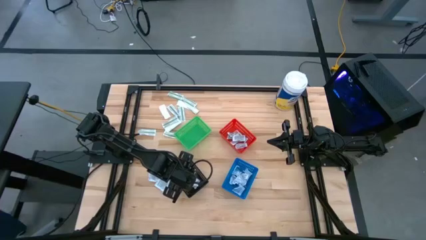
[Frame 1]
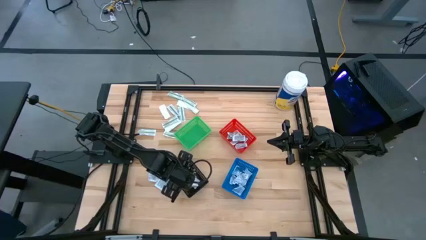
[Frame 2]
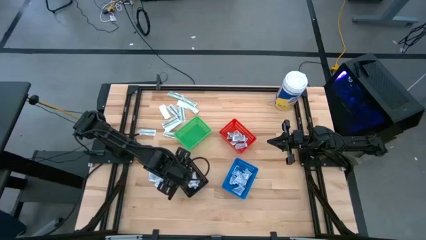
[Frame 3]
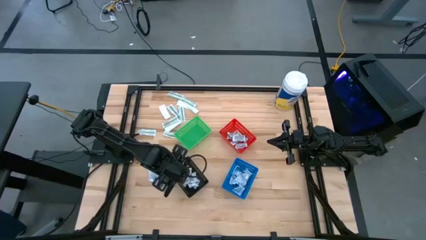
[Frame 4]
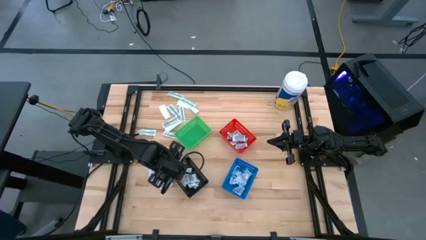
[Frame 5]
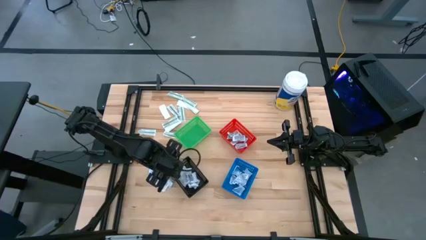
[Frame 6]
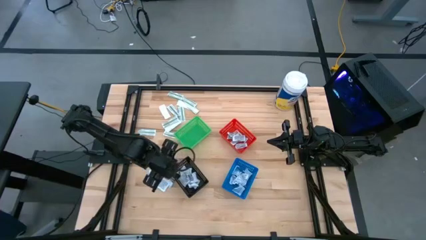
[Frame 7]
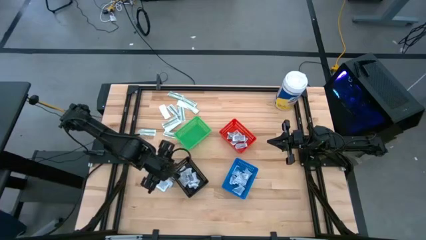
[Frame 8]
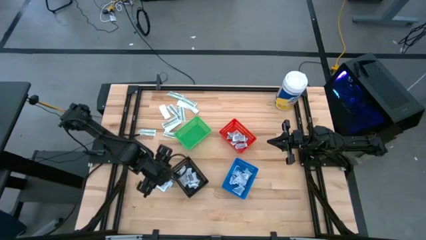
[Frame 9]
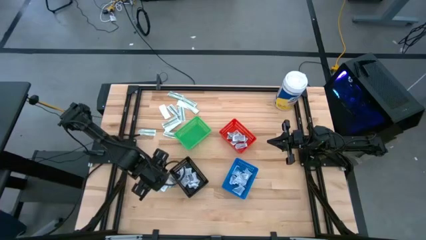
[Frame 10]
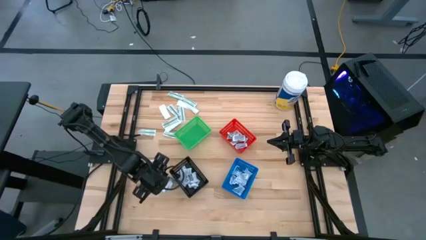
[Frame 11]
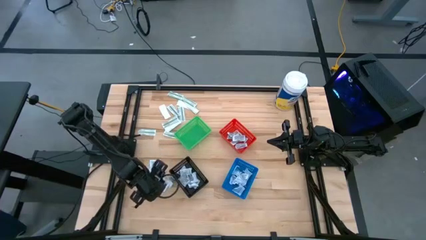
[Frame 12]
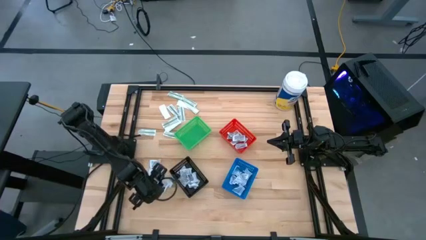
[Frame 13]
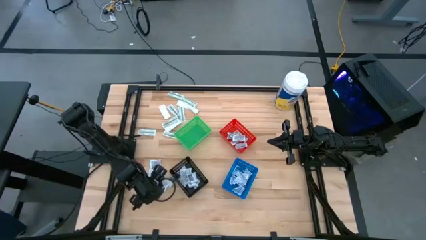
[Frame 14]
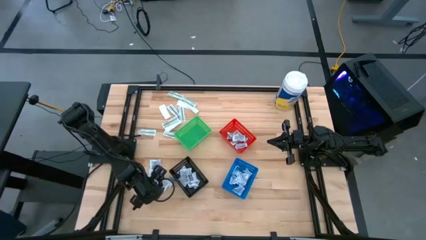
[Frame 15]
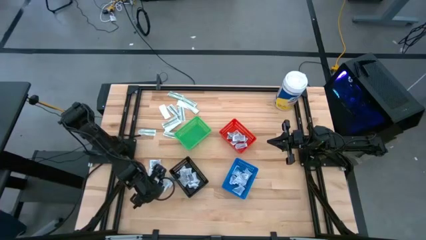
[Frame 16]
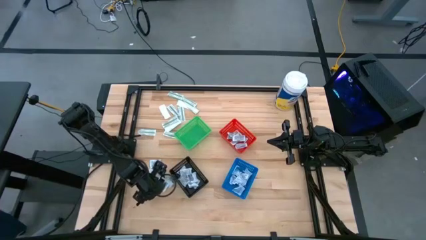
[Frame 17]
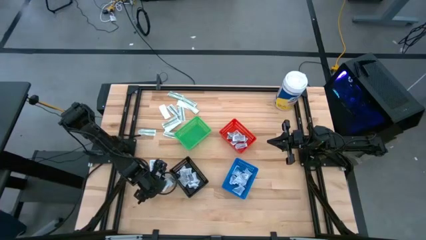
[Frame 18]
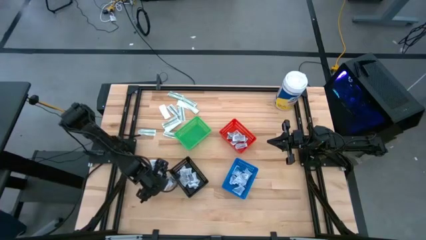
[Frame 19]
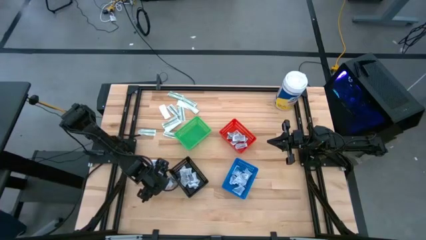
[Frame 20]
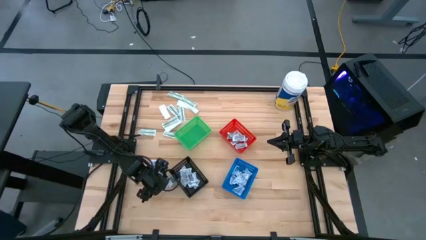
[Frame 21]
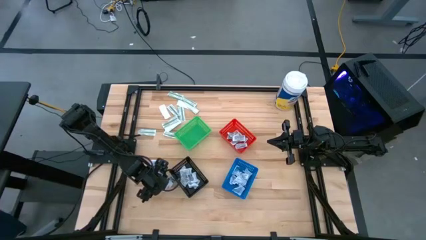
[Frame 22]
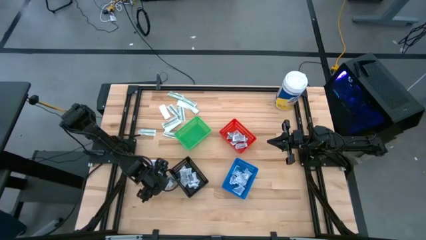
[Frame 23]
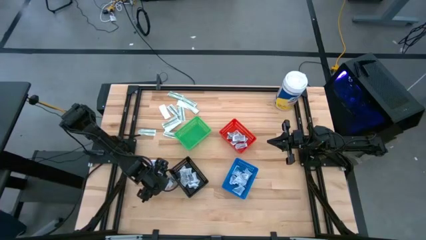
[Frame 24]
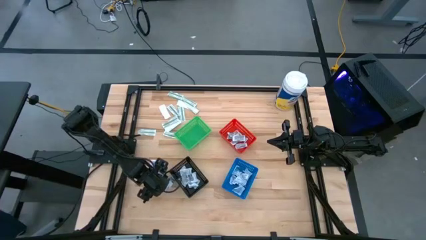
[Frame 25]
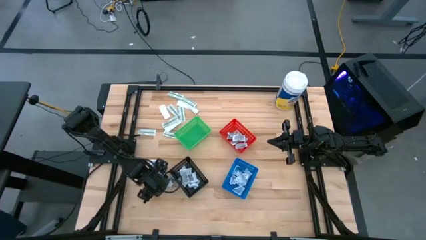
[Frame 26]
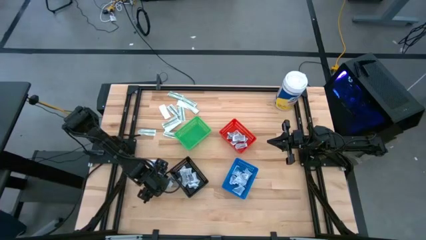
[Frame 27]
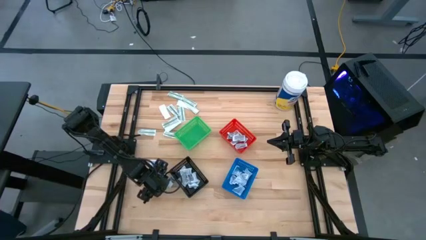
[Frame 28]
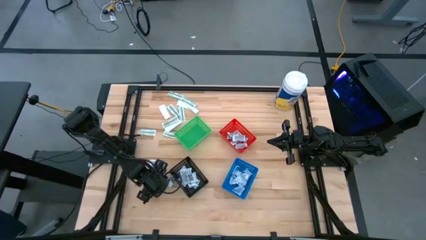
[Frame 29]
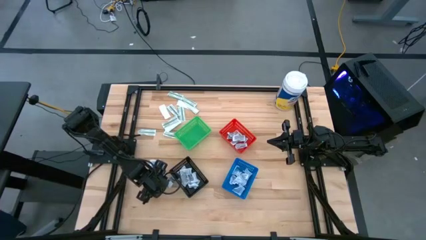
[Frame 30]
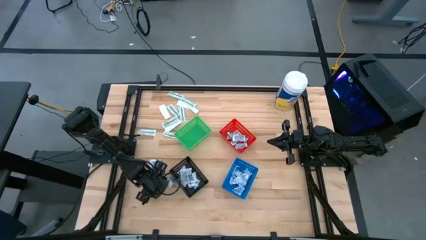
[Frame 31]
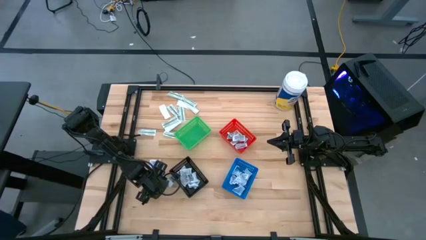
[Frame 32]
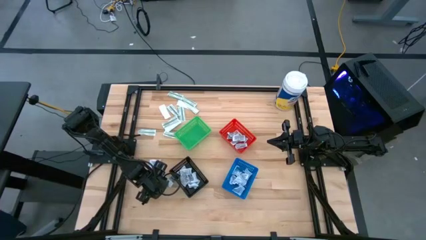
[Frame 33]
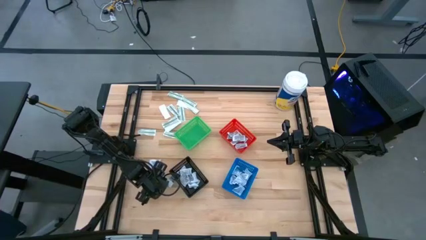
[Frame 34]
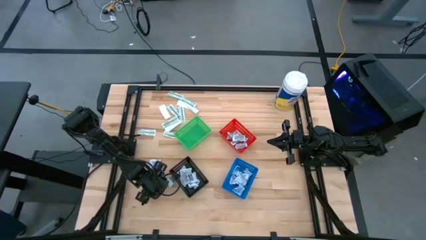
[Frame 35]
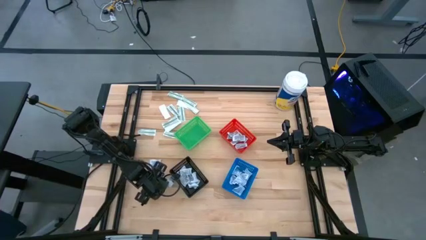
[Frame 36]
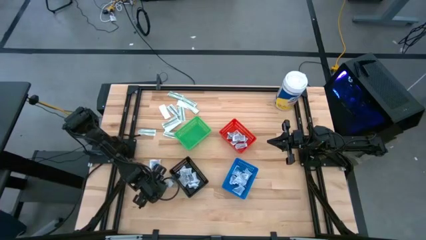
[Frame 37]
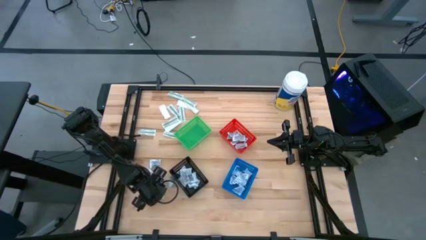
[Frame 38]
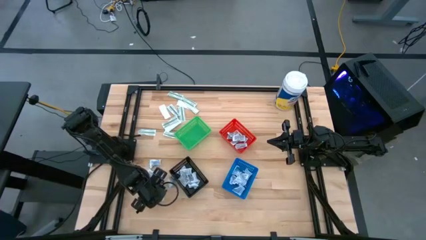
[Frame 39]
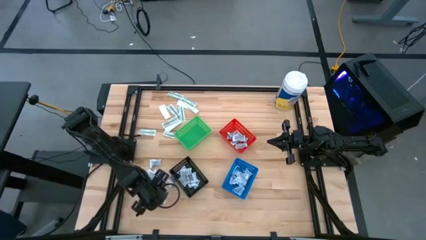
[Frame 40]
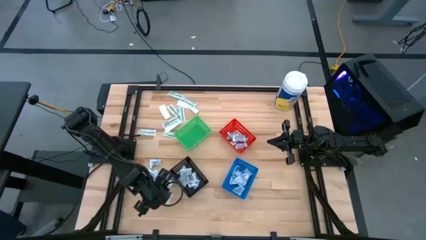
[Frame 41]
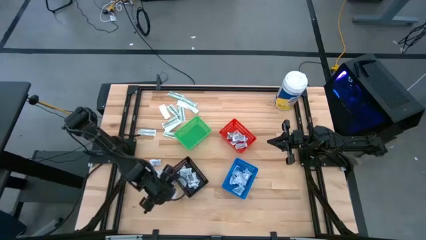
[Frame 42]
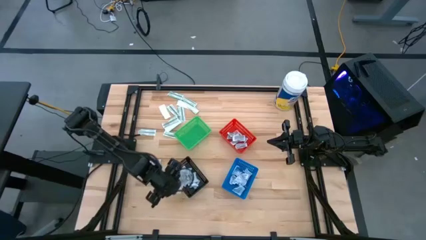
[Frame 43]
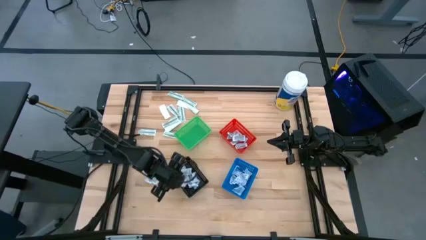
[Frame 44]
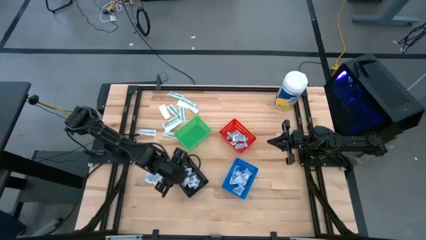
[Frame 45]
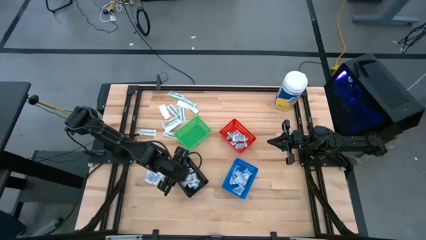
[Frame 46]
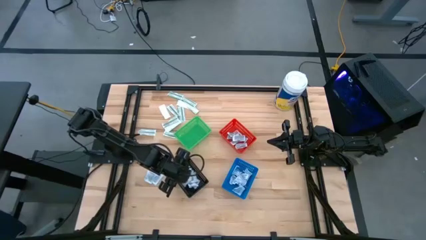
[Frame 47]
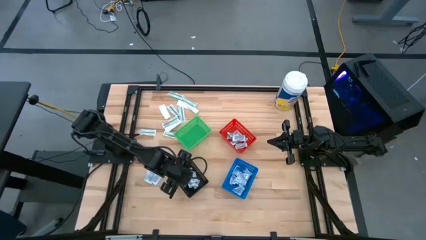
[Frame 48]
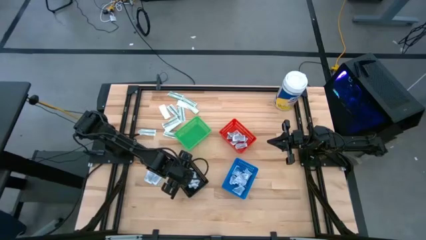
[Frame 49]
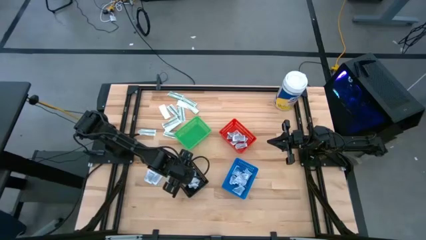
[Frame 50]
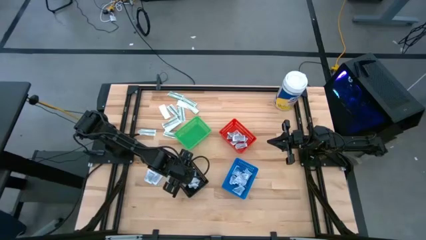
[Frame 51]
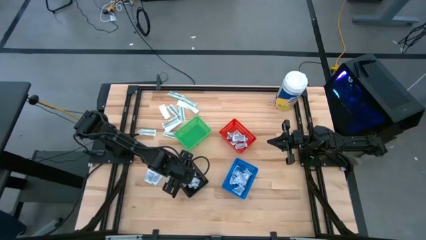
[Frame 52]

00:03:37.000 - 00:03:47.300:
Task: Pick & Place First Aid Supplies
Put the black towelette pack into the black bin

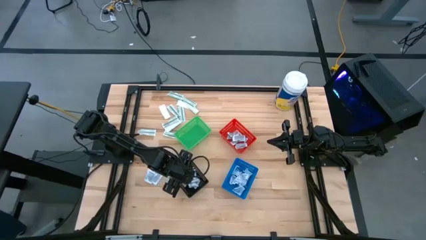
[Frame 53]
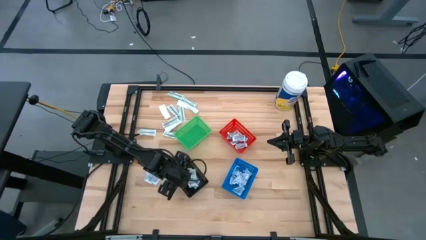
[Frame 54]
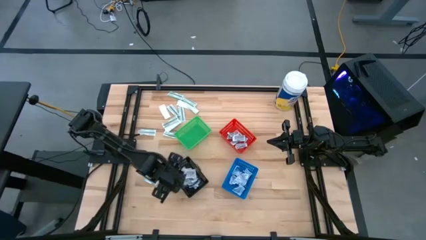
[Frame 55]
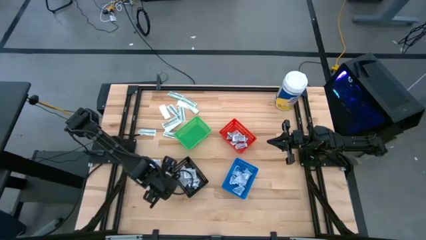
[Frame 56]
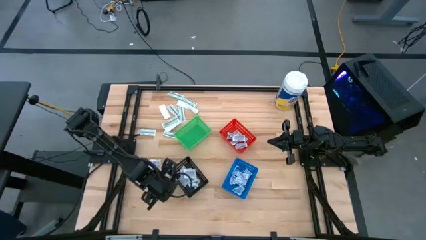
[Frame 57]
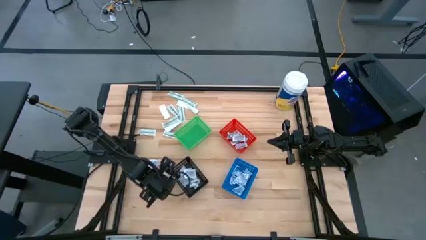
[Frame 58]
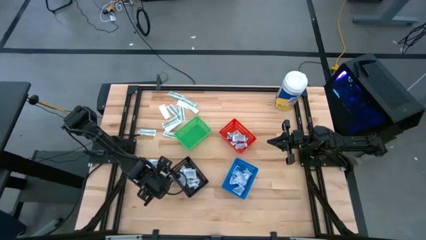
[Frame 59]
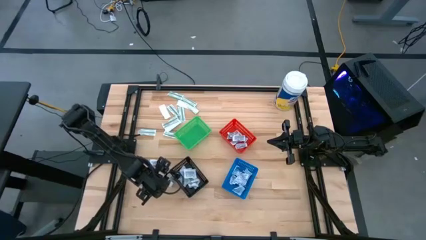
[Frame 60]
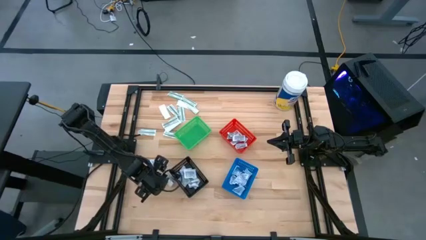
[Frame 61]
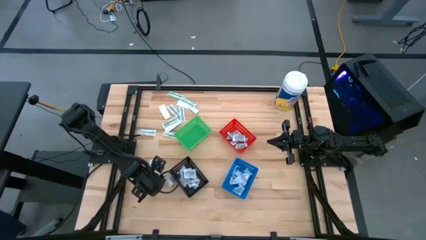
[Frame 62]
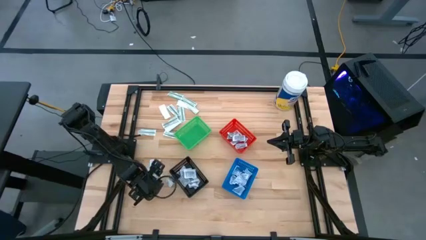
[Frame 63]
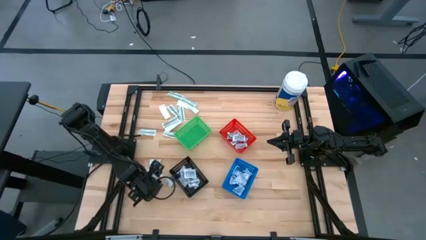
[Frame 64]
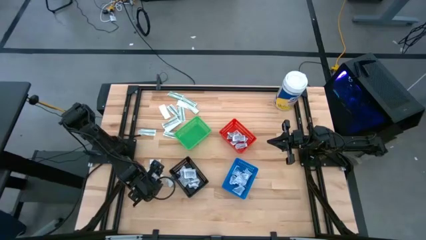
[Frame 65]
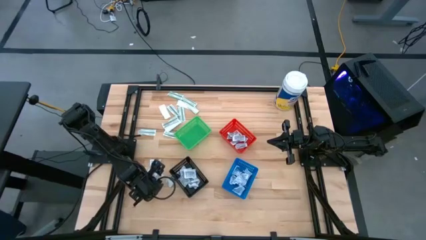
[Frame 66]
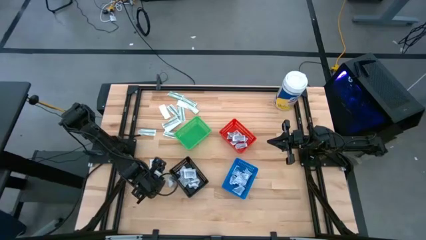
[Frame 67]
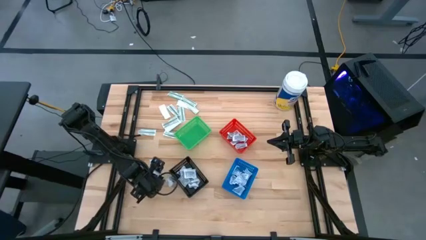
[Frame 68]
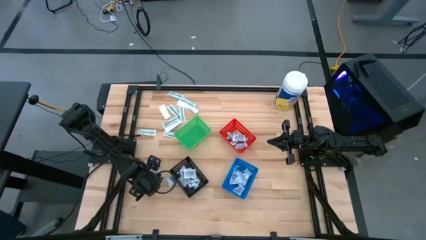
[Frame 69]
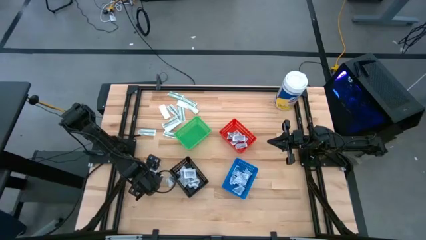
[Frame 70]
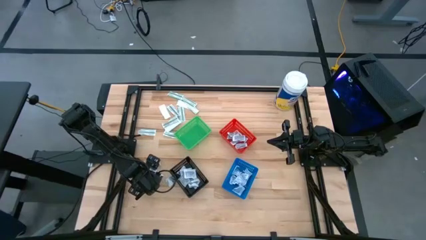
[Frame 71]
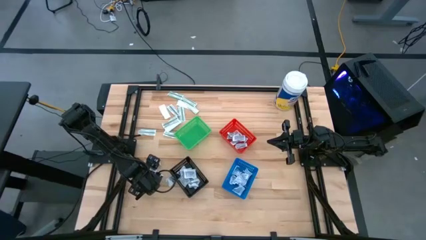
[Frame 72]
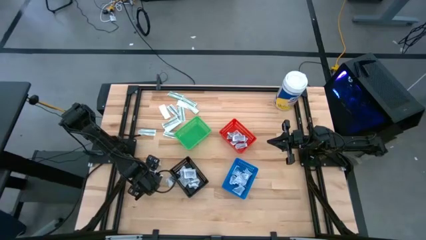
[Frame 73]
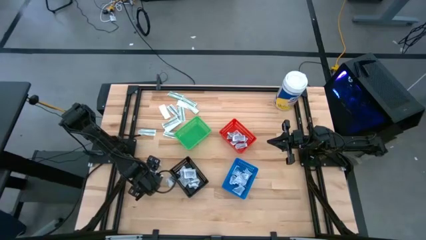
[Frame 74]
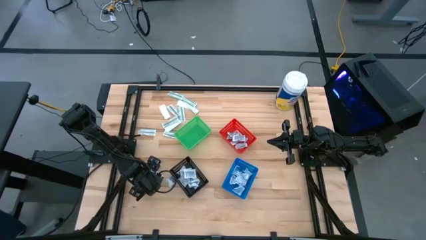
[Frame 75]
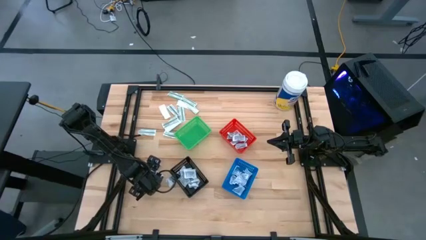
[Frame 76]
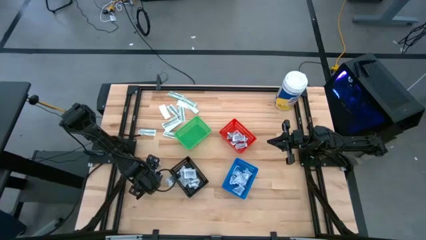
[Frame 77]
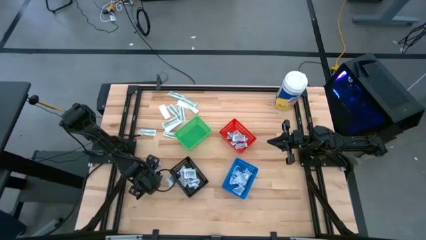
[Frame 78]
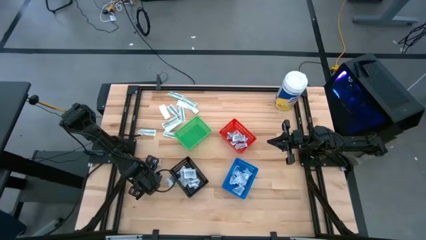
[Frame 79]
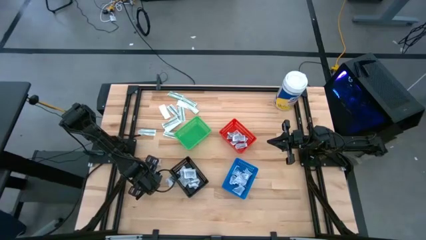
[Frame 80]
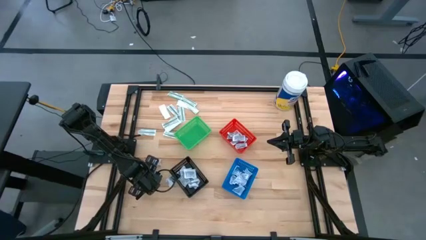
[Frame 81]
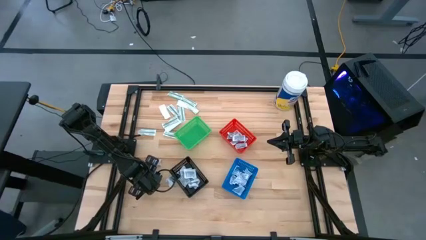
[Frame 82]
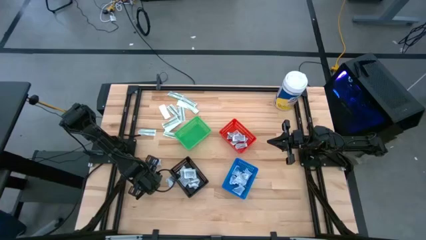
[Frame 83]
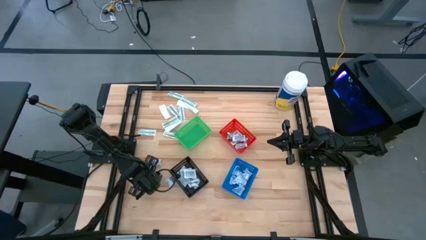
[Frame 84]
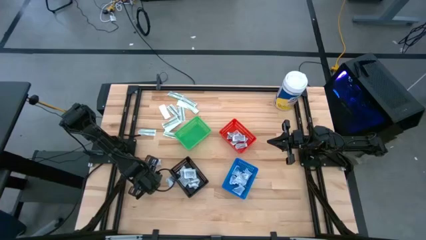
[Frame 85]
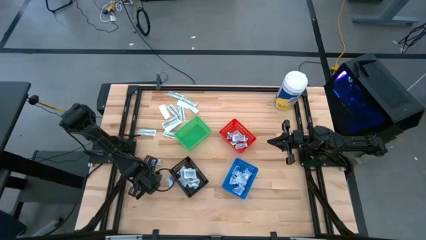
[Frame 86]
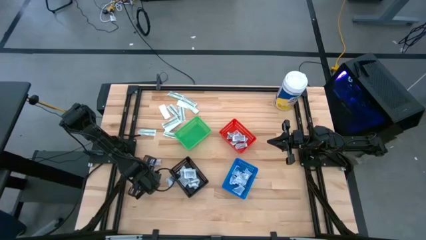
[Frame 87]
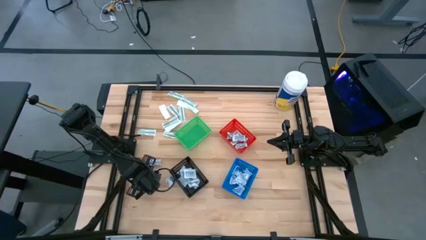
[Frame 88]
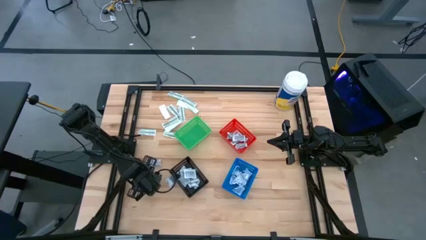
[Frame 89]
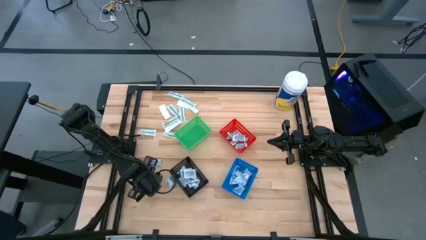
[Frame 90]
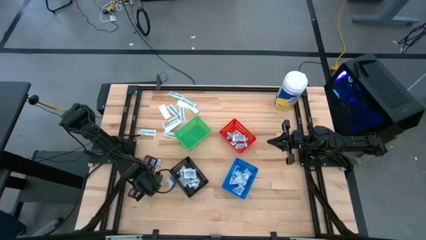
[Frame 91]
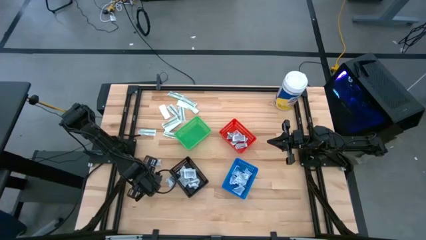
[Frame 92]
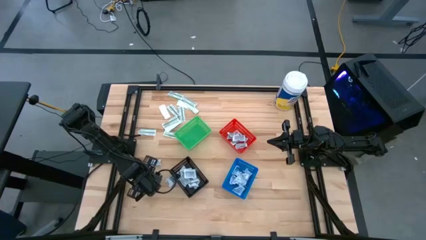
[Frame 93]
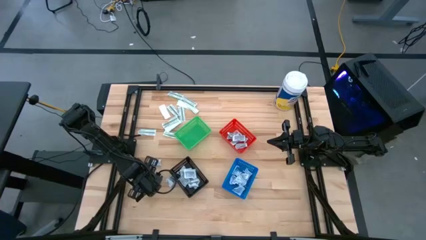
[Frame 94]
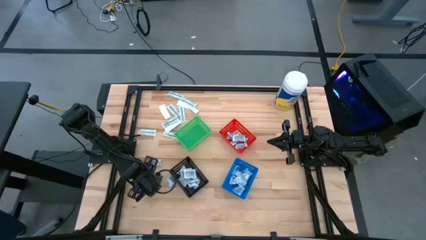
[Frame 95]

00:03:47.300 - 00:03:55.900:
Put the black towelette pack into the black bin
